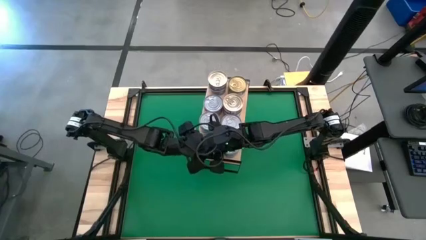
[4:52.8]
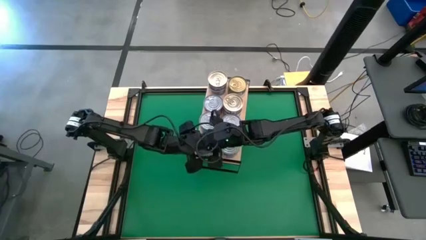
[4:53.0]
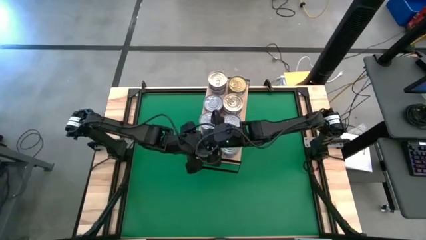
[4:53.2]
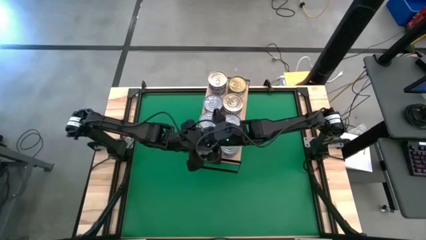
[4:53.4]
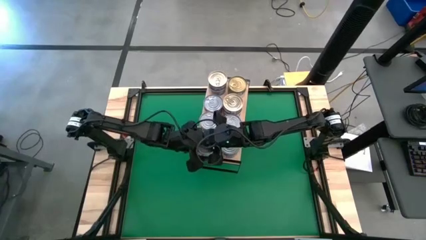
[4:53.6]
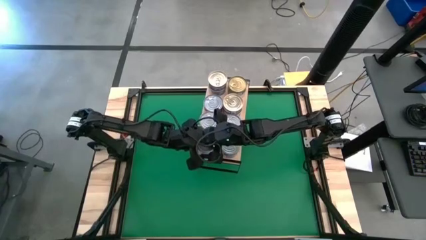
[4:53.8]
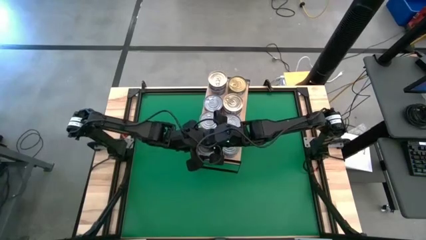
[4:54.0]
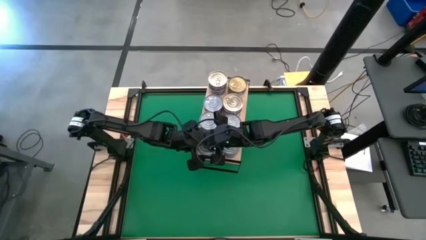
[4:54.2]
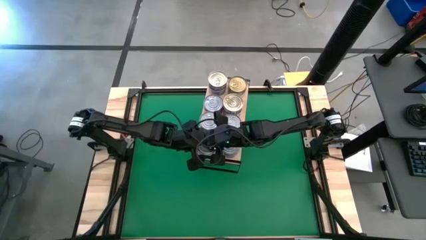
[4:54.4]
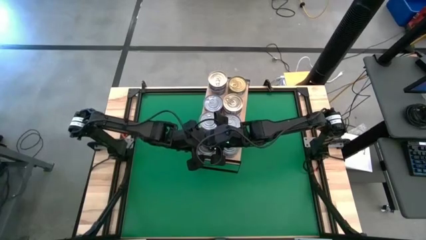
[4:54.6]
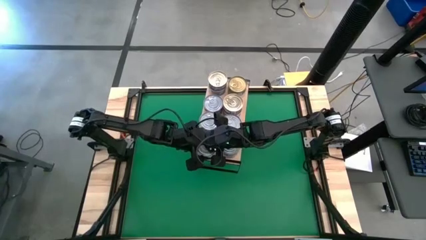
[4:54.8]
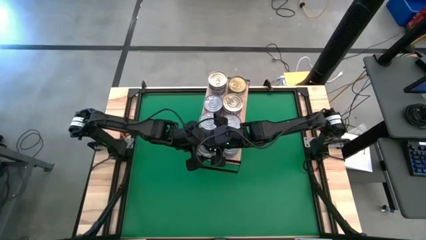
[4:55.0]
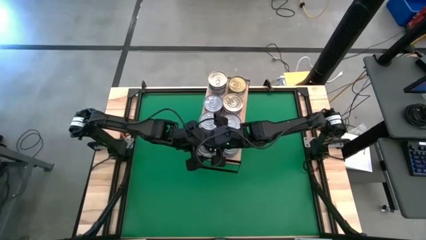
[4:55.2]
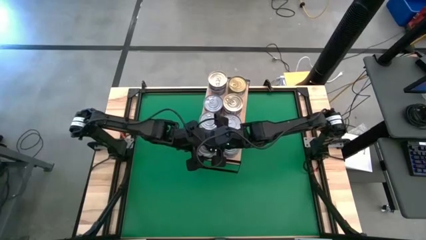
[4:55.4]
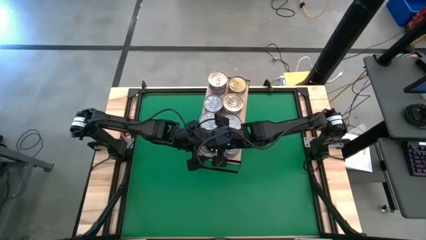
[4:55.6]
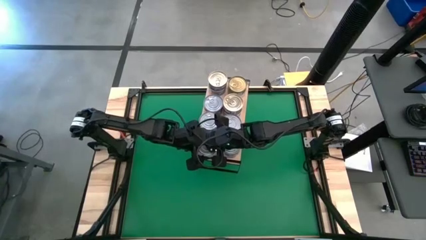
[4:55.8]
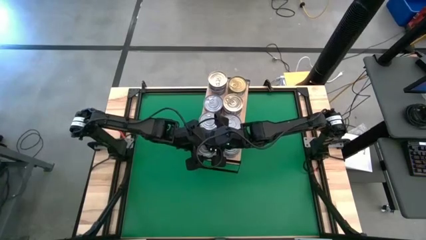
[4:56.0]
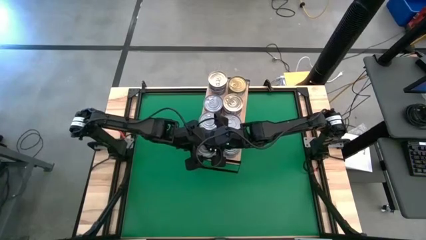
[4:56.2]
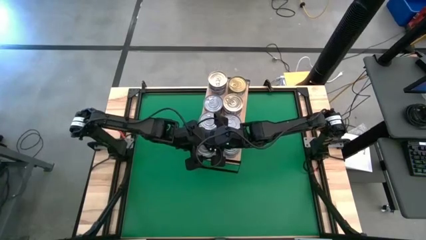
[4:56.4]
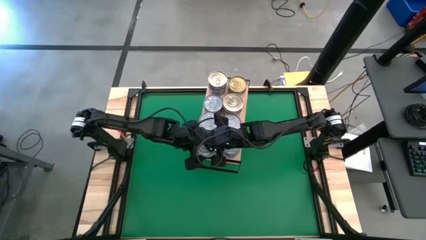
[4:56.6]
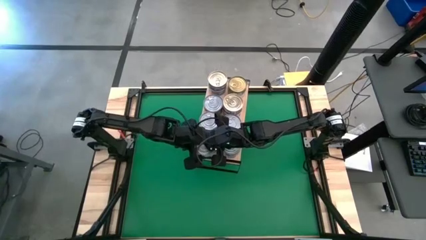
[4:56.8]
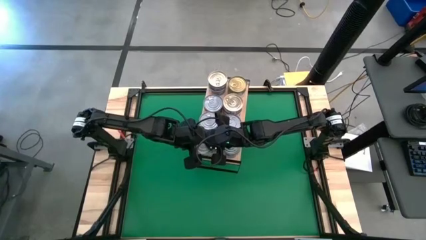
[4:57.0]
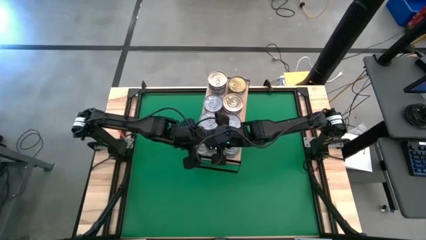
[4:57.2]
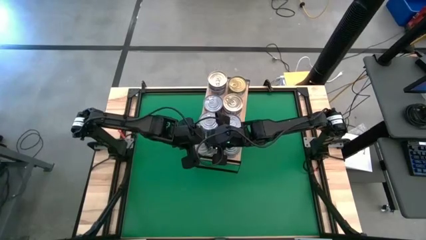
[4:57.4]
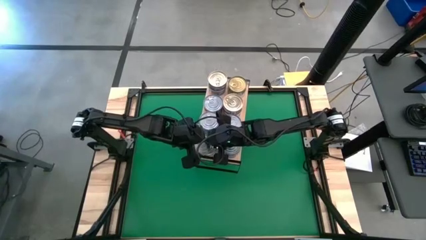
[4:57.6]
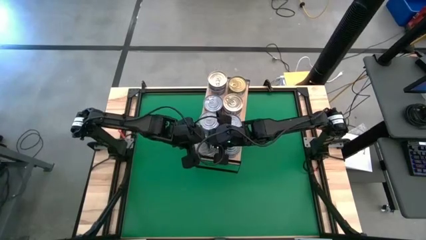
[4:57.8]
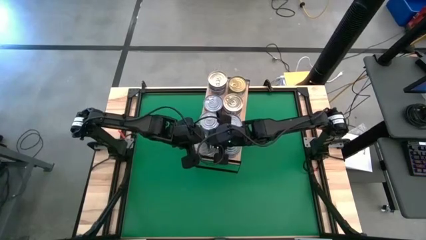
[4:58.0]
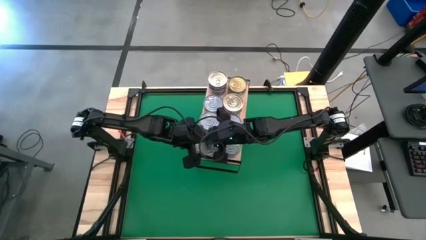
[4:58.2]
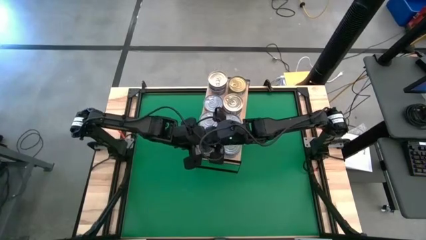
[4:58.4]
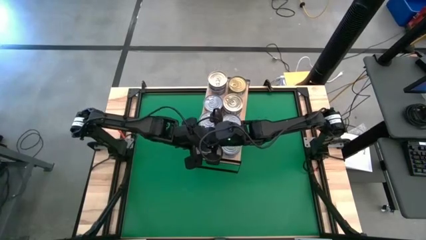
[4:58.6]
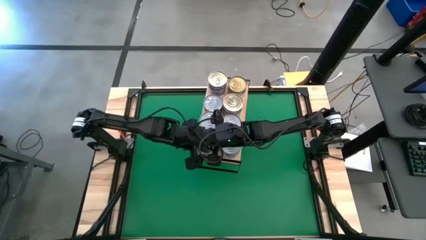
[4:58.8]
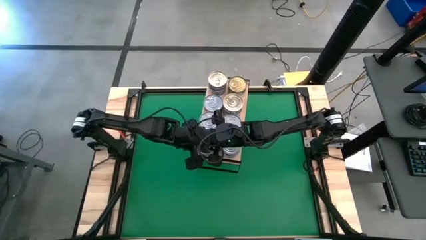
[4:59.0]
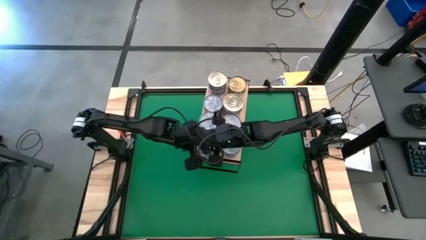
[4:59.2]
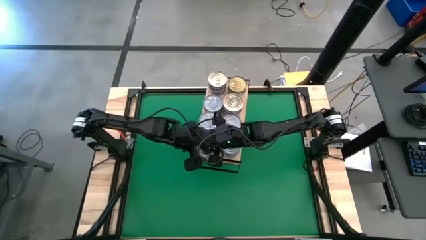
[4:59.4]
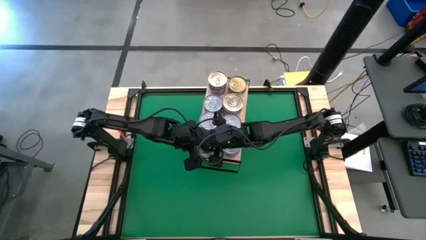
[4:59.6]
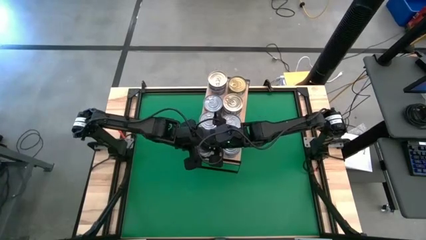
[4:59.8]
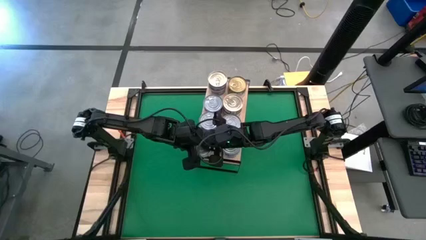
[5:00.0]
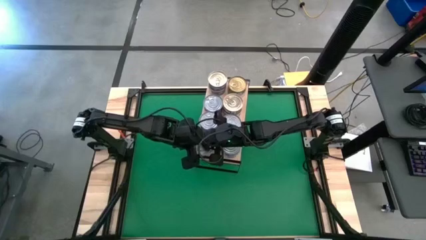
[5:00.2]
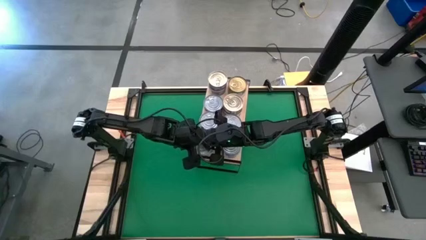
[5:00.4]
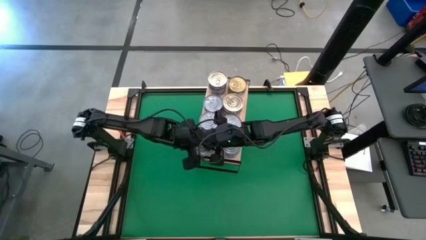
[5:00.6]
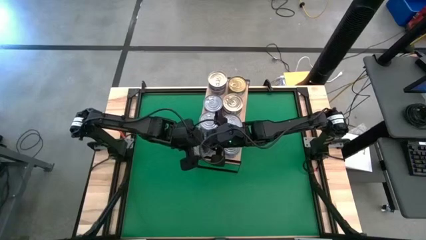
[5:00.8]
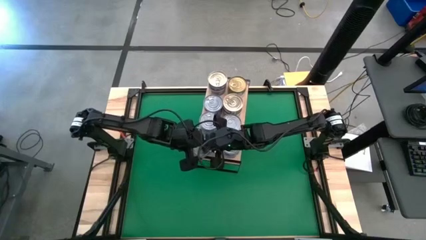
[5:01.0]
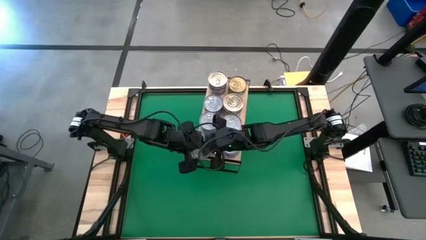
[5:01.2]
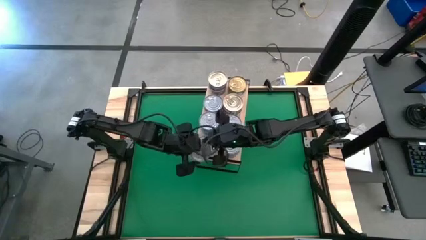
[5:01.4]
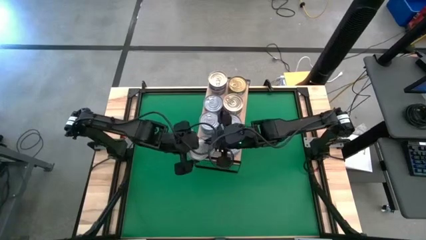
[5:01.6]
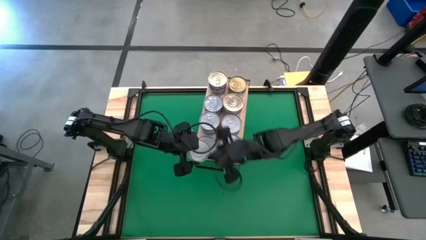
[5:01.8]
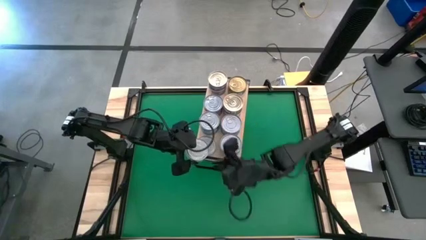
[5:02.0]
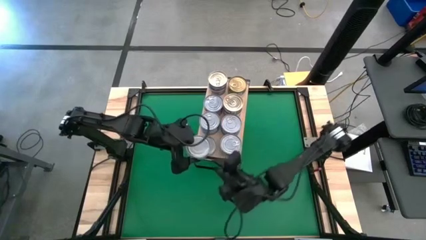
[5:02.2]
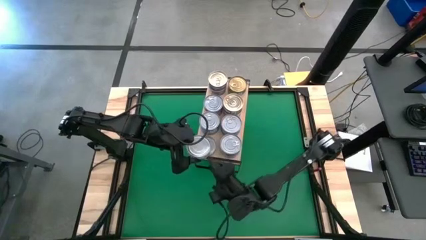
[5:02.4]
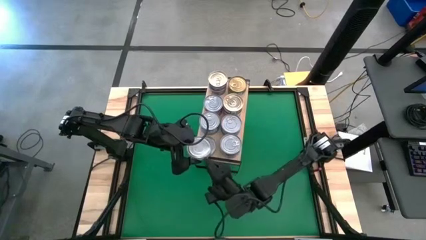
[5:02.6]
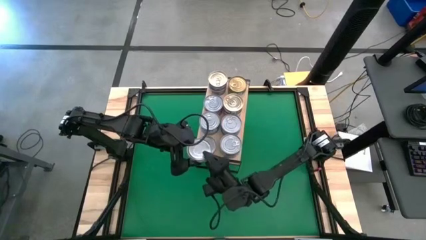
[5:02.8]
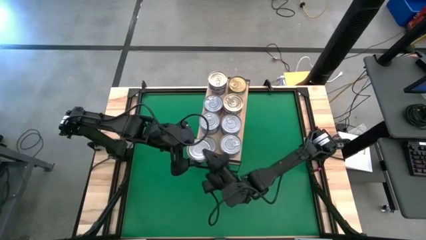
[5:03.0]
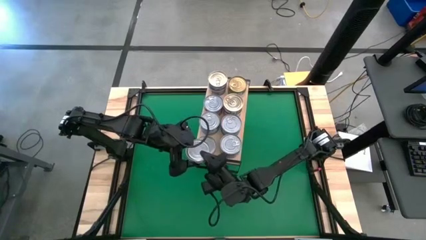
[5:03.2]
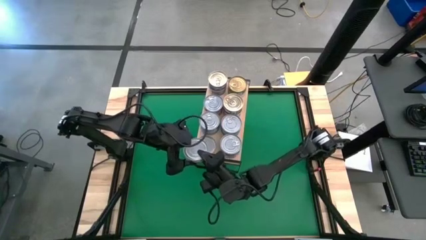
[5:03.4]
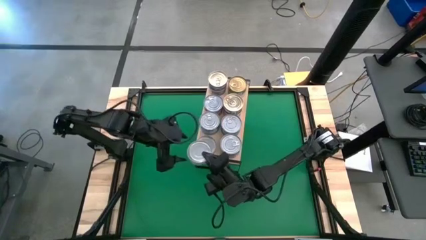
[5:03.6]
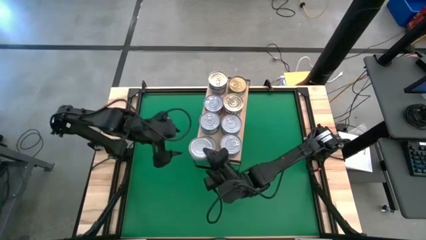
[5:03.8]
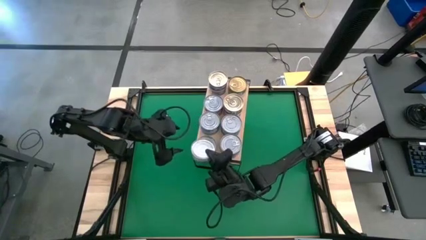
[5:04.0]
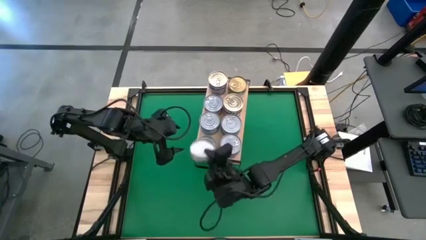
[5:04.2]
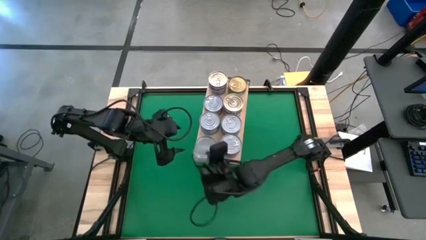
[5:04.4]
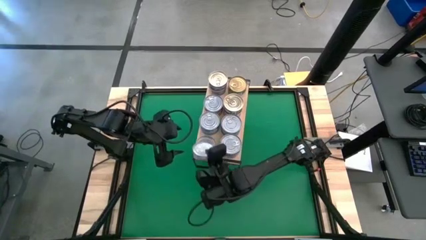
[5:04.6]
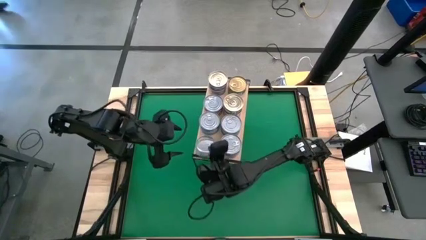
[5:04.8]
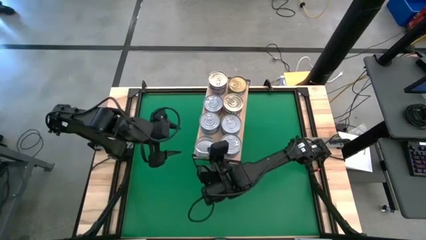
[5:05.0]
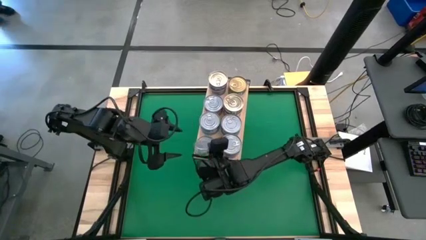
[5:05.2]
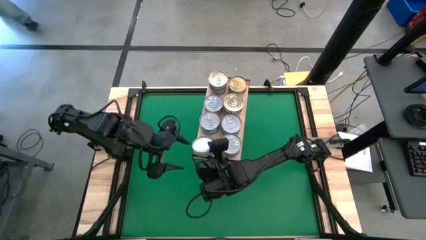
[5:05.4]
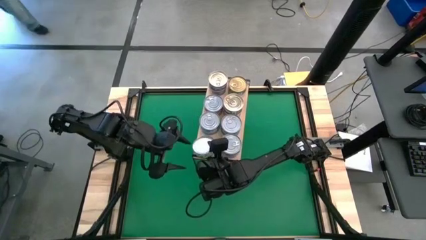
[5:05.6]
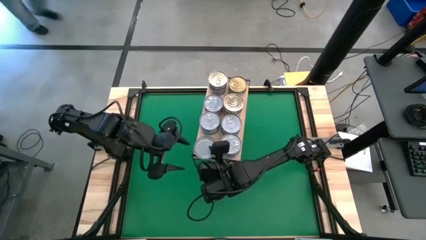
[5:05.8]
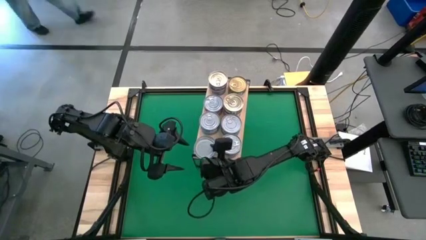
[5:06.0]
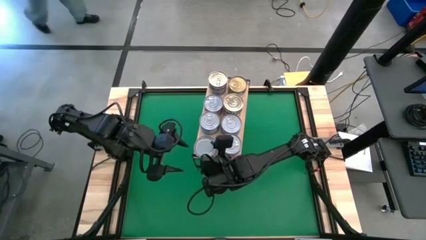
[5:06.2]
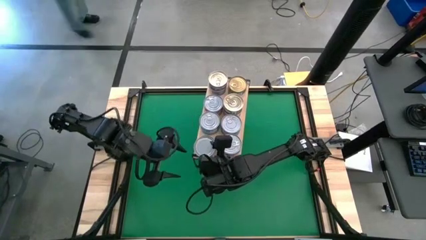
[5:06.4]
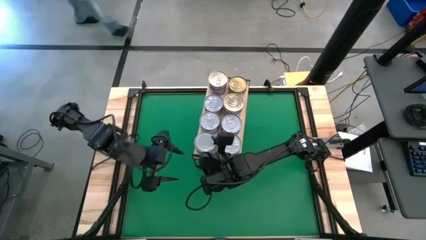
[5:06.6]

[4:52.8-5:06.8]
Task: Stack canned seafood by type on shelf
Stack the green tuna can on top of the other green can on the shelf
